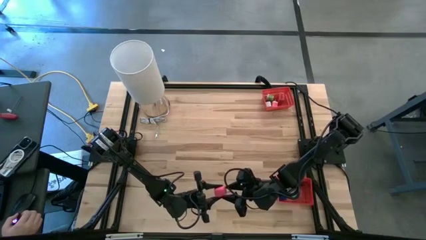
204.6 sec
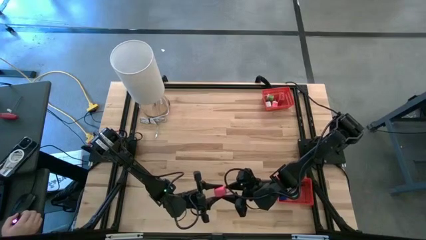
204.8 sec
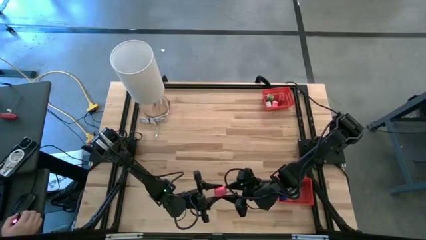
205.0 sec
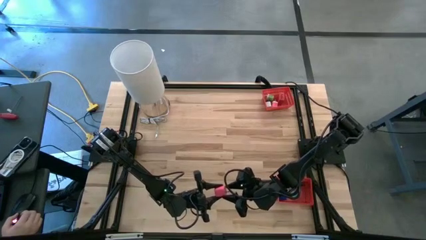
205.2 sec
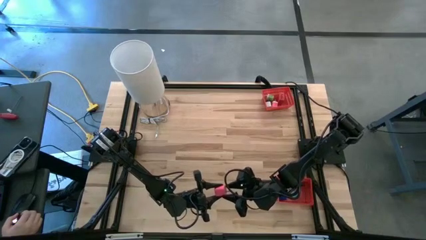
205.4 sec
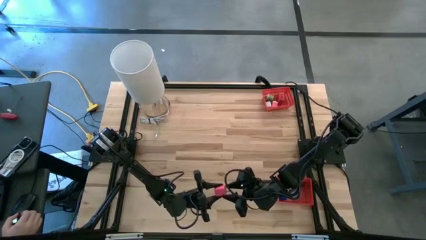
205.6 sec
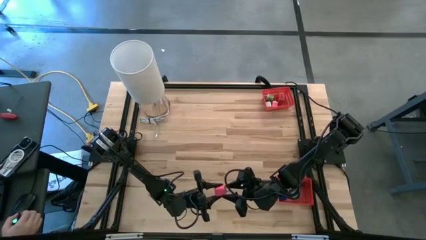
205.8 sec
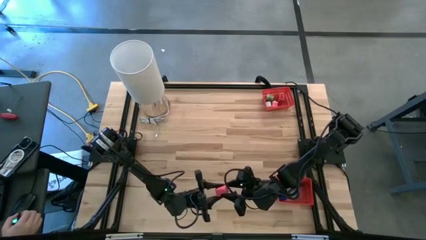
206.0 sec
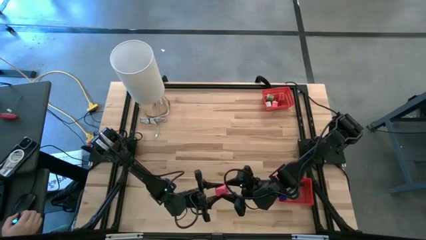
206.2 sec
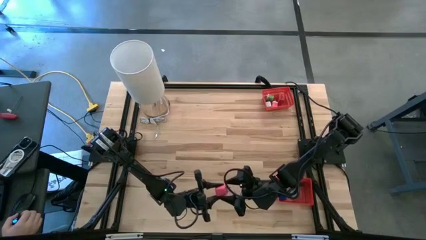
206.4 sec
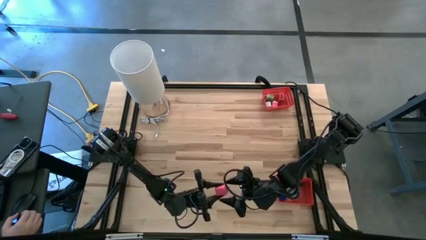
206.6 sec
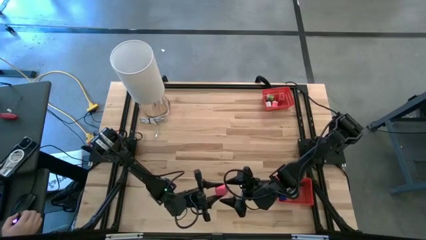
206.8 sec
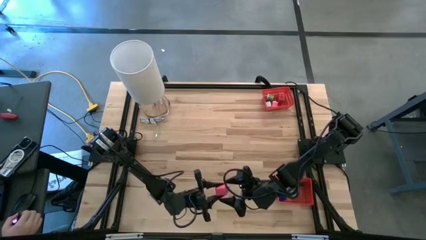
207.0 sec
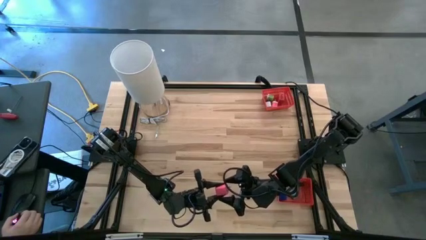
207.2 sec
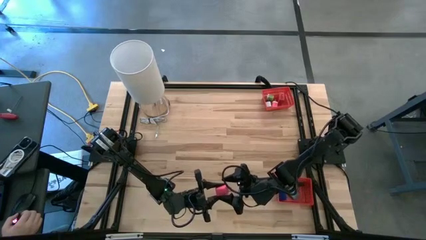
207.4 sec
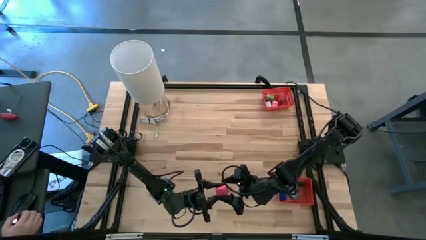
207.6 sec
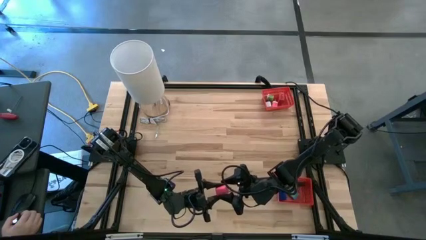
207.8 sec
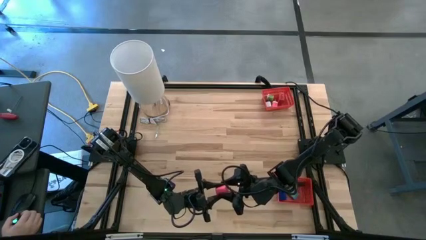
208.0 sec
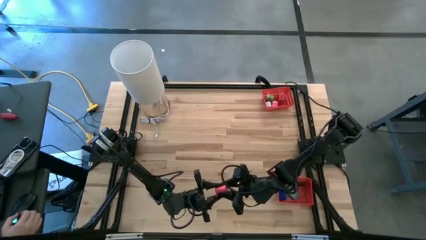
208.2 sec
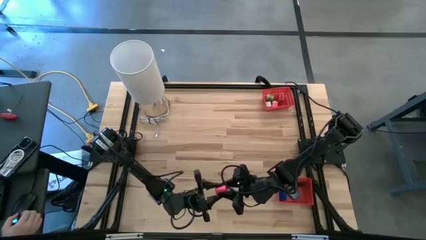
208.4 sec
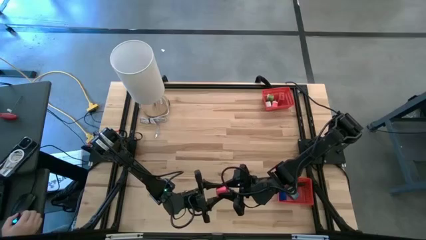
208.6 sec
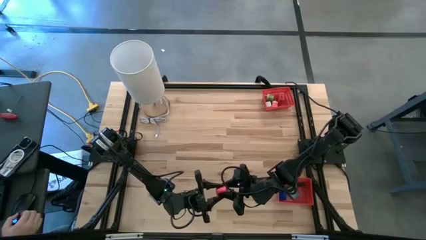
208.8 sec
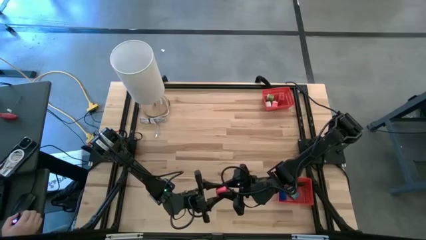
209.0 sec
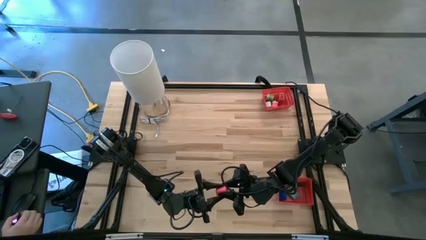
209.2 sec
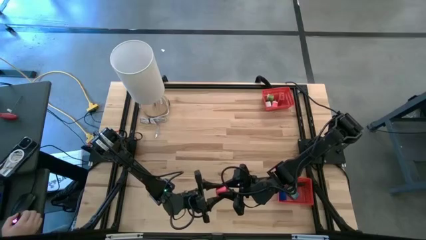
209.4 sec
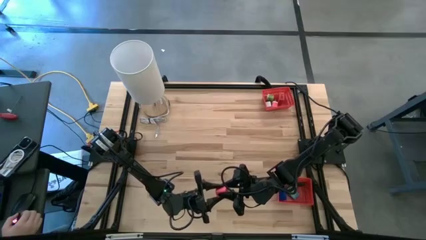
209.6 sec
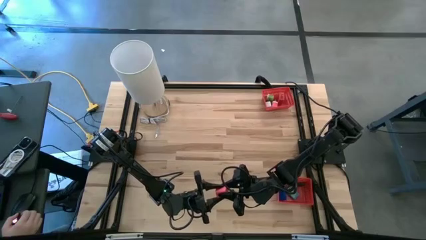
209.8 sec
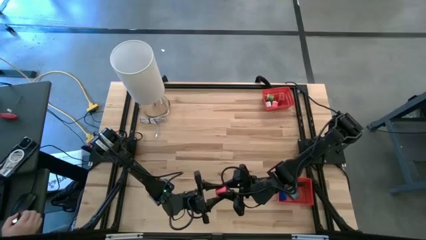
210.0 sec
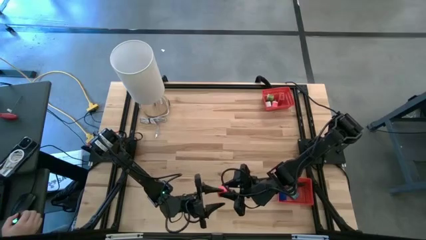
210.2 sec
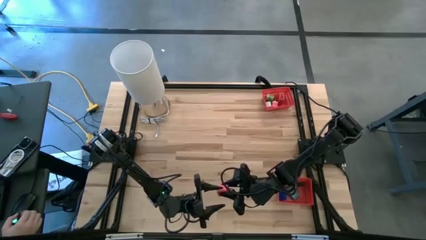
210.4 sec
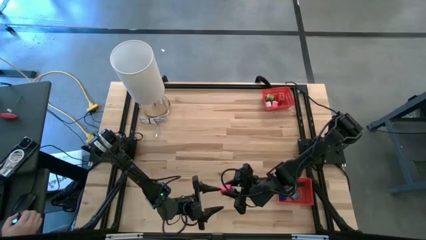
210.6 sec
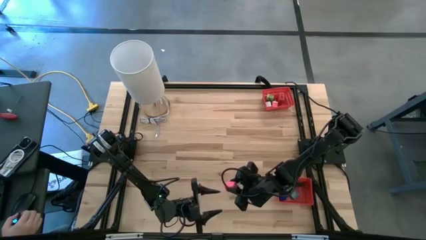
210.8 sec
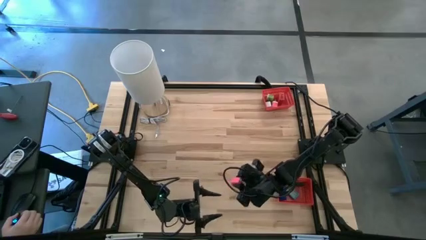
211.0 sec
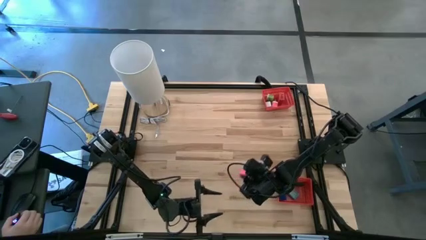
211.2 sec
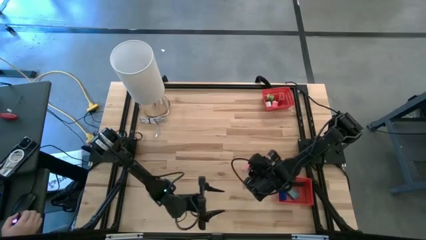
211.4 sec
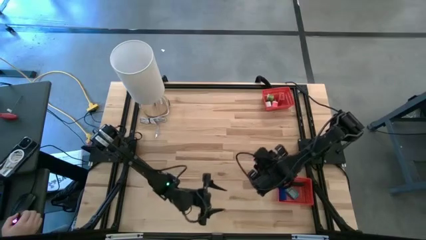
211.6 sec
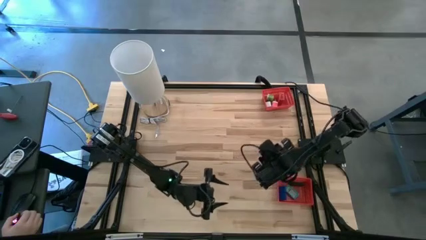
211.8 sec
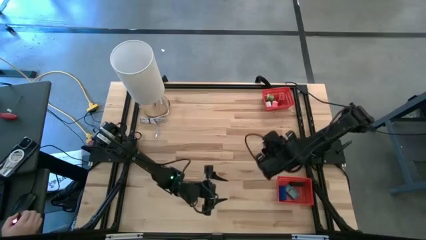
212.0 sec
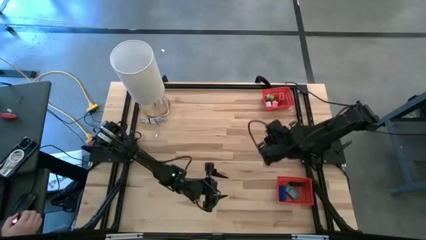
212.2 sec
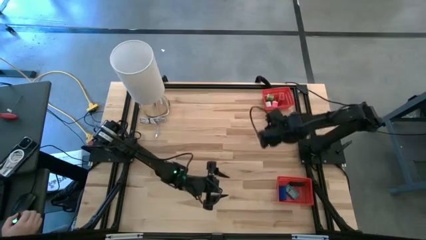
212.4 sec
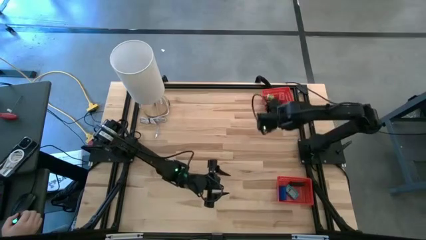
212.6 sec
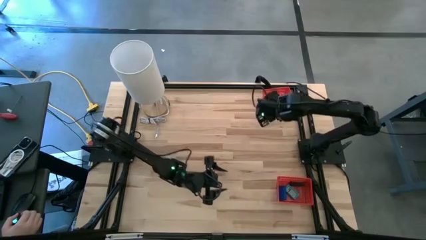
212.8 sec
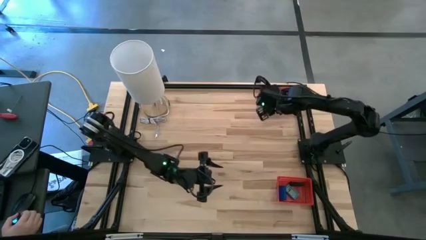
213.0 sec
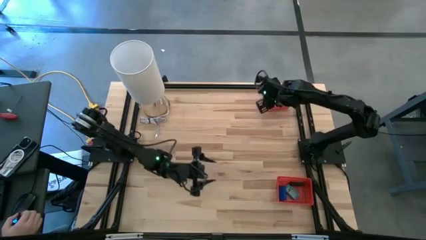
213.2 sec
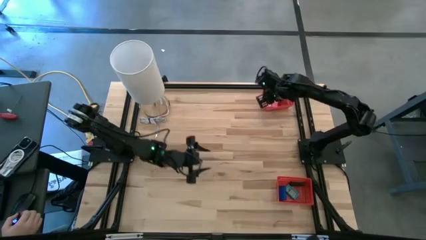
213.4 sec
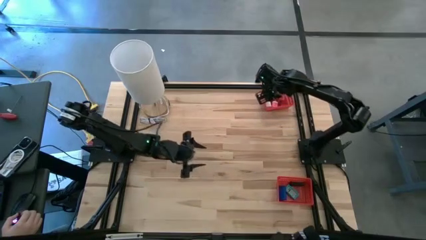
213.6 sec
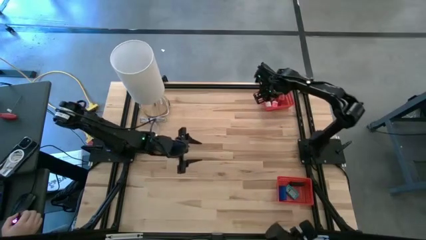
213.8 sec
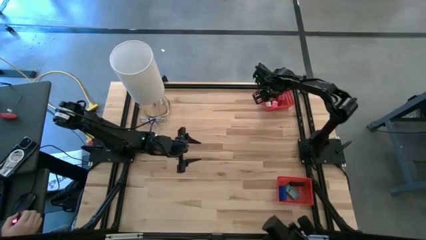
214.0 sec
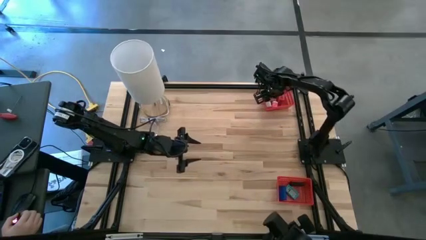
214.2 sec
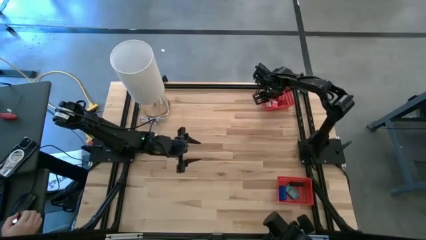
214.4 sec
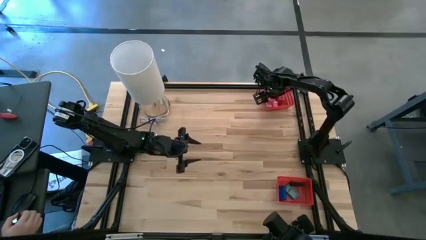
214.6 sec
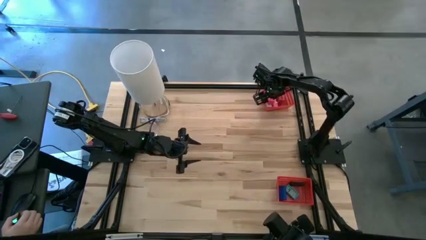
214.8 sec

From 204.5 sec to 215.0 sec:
Task: Pick & Place Office items
Put the pink charger adapter into the top red basket

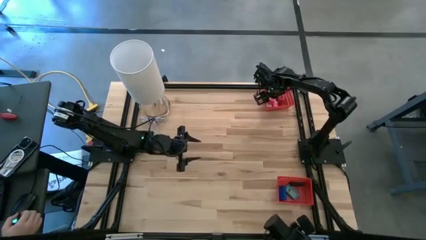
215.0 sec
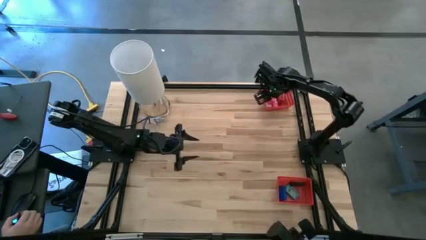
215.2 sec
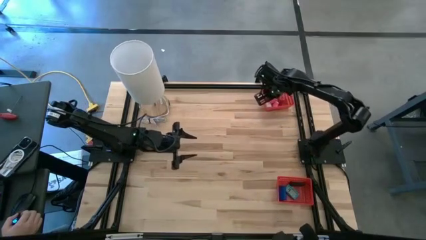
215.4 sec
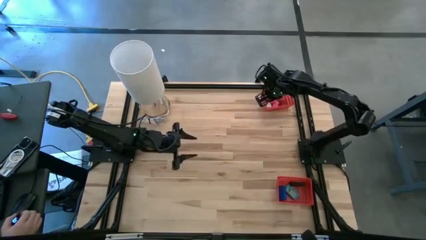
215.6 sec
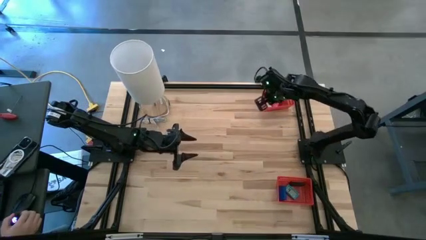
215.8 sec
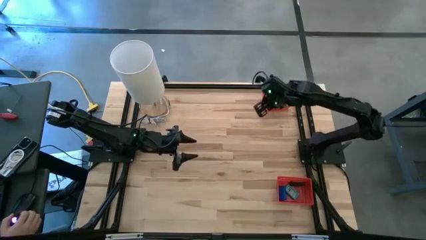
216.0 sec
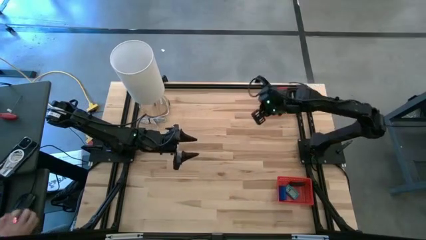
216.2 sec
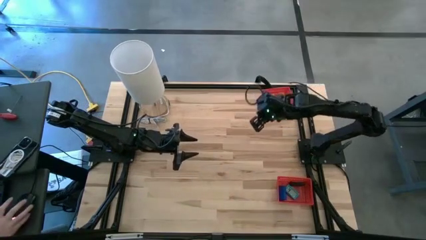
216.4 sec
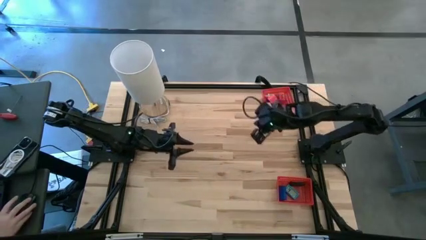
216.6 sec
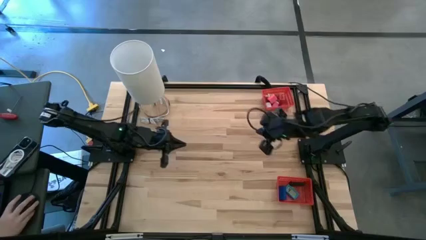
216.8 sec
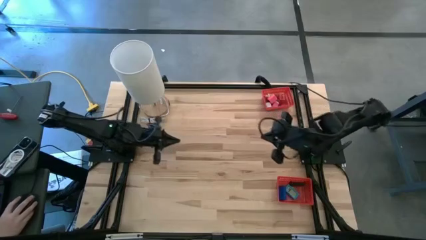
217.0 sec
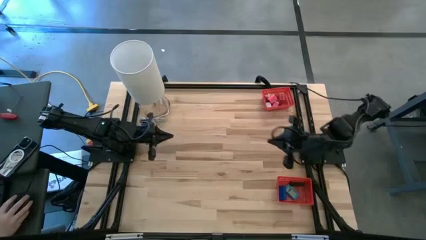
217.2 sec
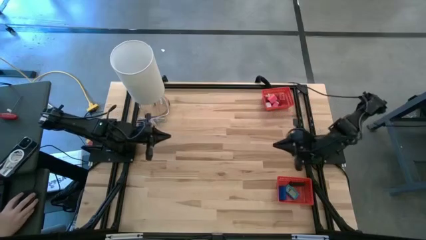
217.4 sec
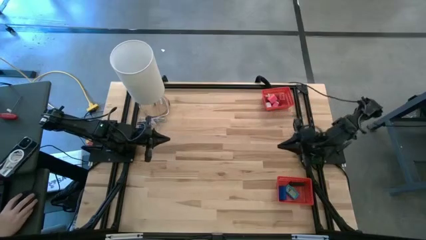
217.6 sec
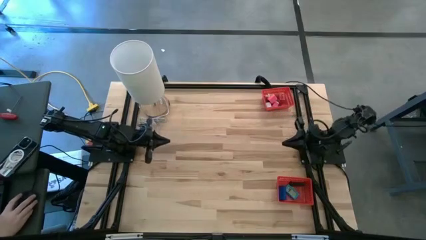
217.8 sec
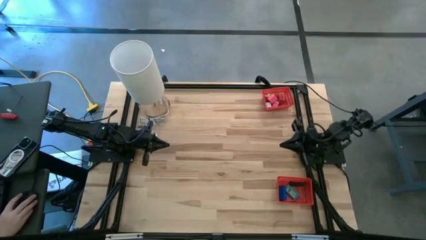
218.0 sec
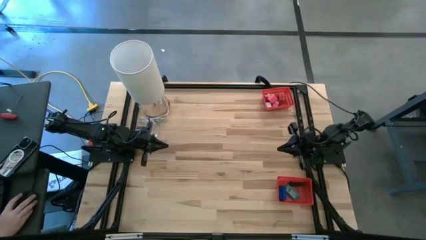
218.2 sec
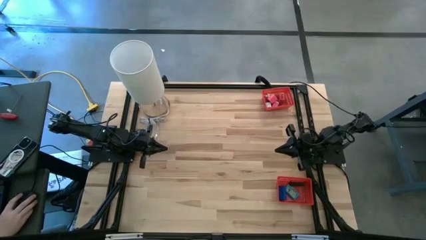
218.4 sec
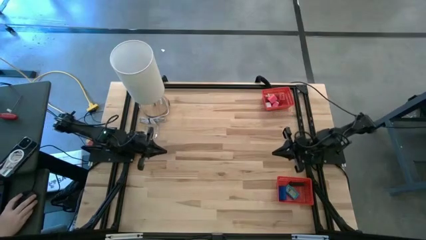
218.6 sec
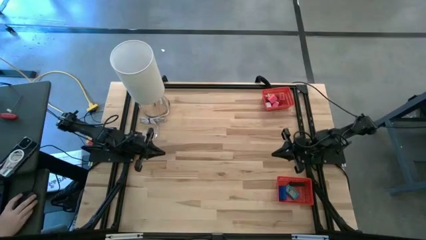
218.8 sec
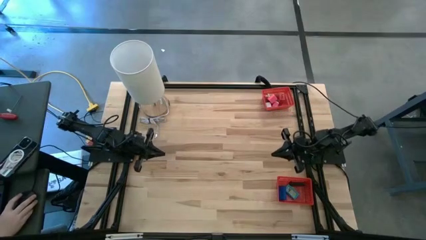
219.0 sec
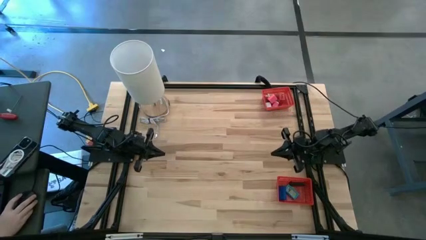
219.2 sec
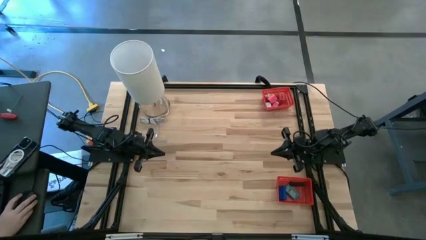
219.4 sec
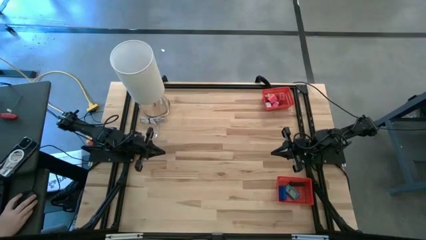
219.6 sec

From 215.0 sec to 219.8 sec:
Return to Home Position
